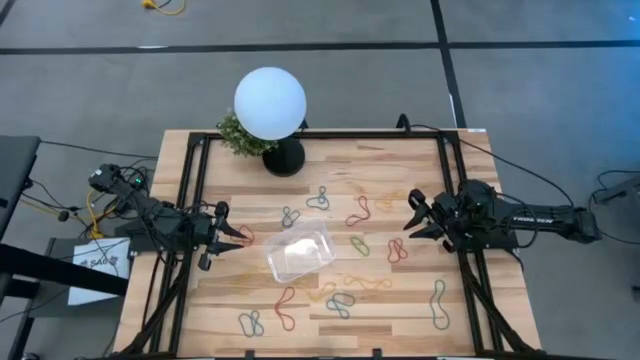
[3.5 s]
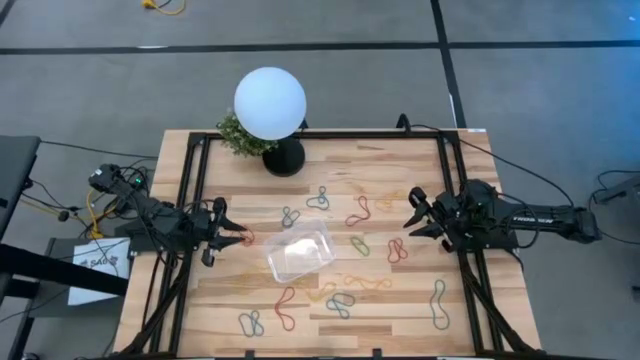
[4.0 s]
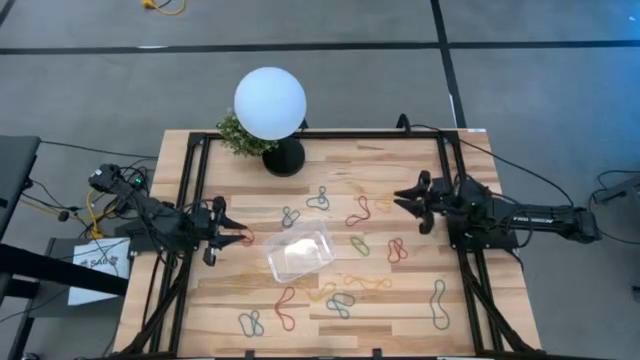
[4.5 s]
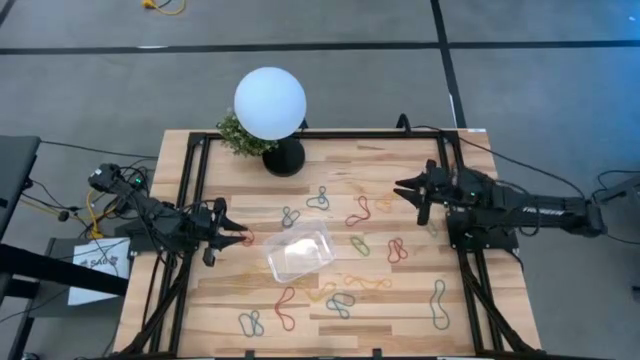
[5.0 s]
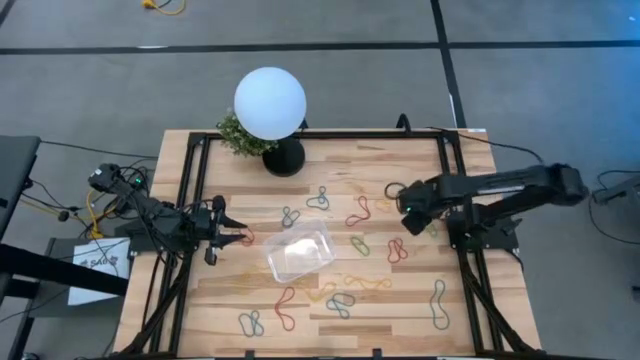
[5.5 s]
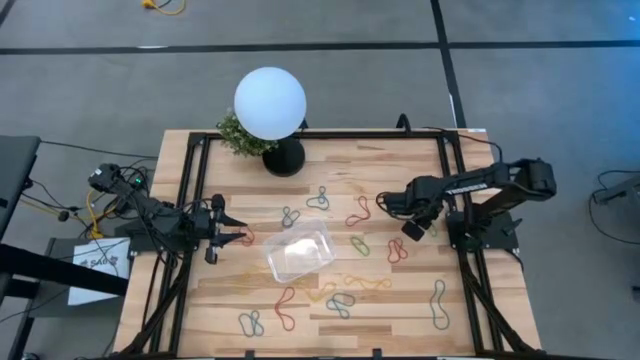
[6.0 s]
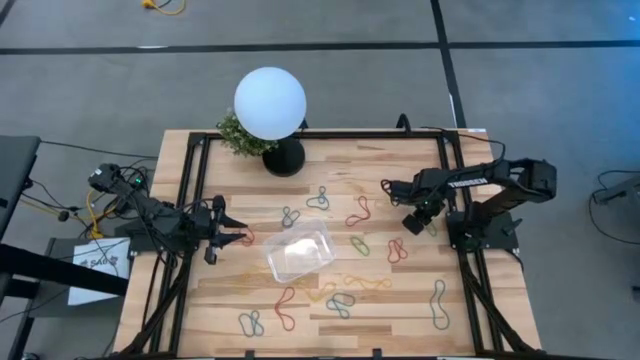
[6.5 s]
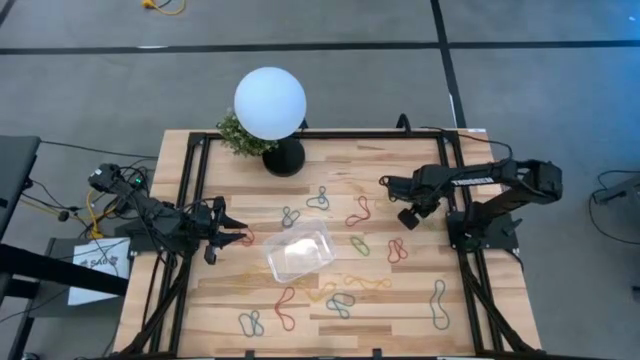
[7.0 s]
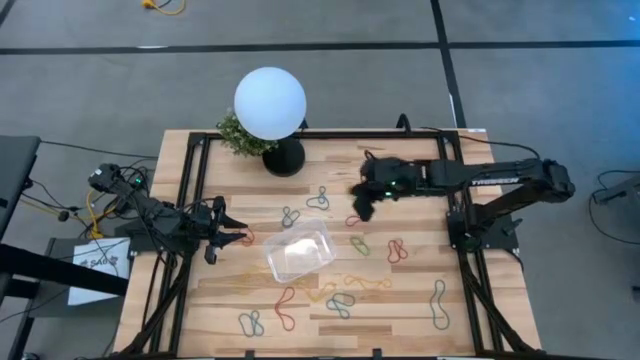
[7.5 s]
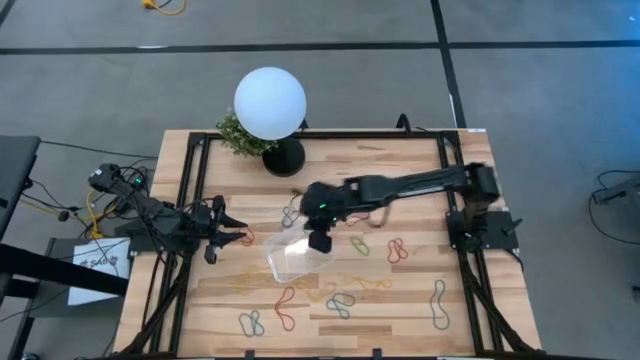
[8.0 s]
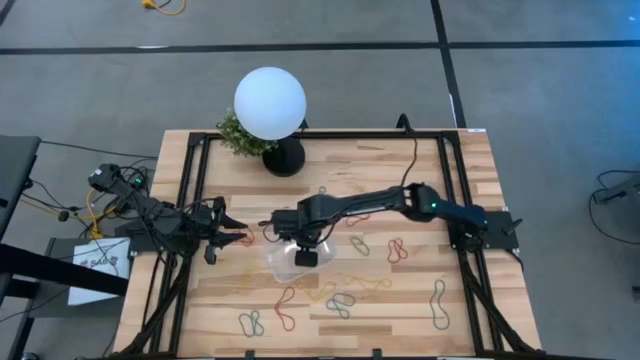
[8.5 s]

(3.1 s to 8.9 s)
Task: Pick and place items into bin
Put the green rubber band into the transparent bin

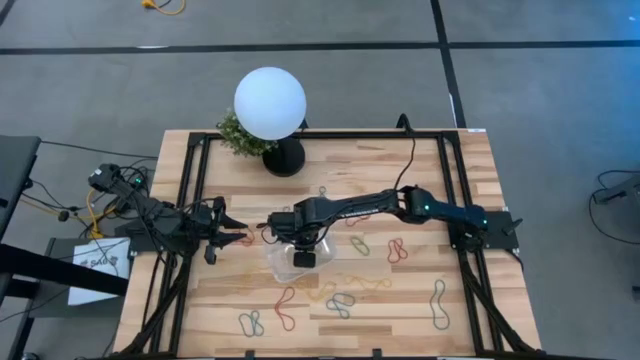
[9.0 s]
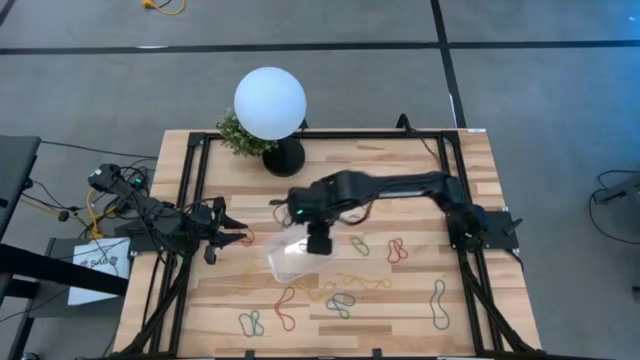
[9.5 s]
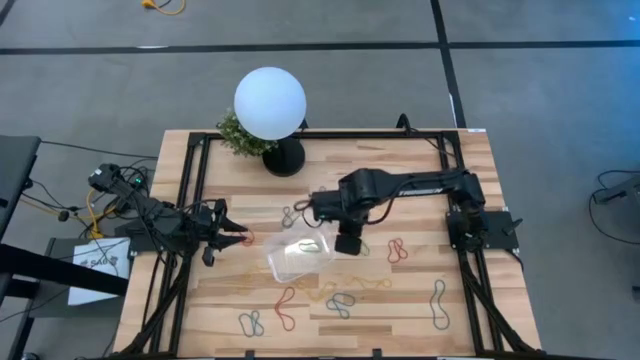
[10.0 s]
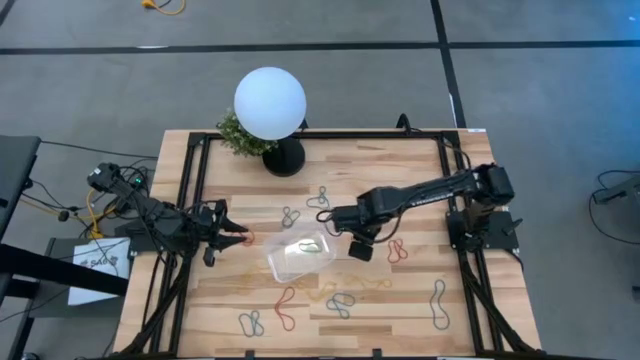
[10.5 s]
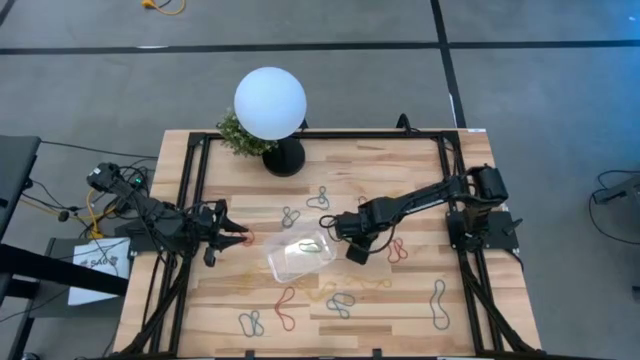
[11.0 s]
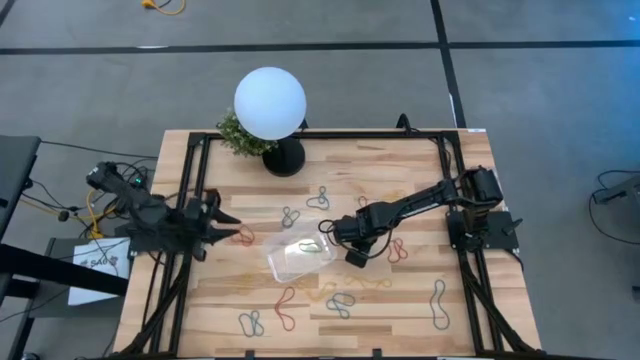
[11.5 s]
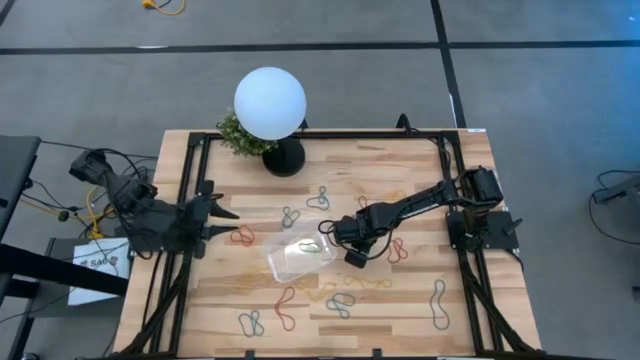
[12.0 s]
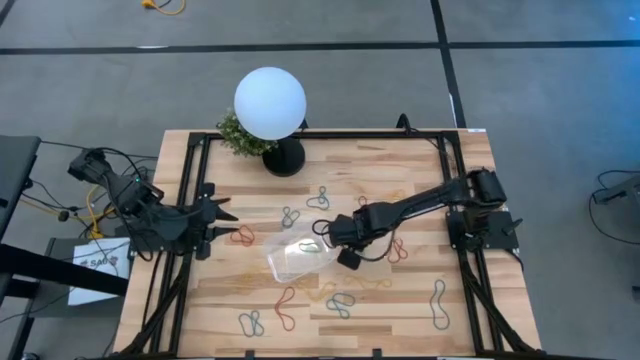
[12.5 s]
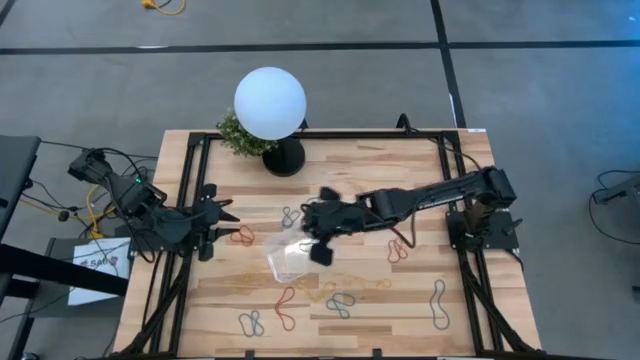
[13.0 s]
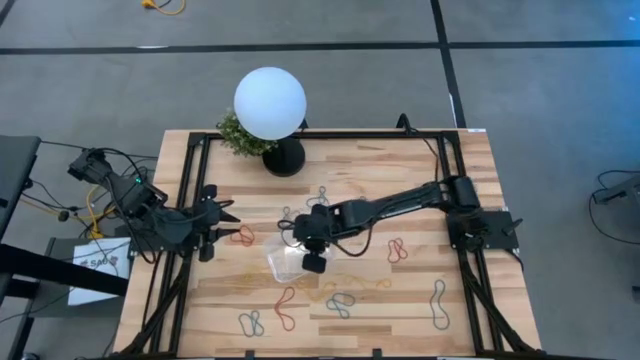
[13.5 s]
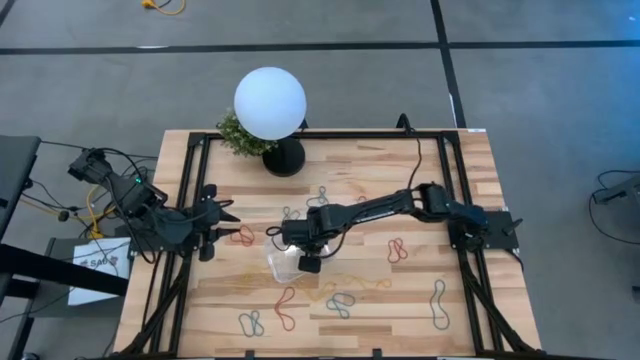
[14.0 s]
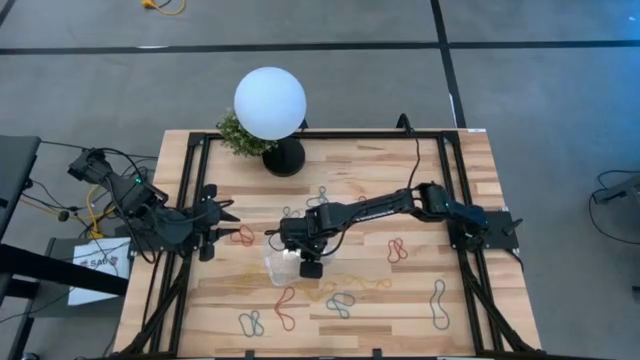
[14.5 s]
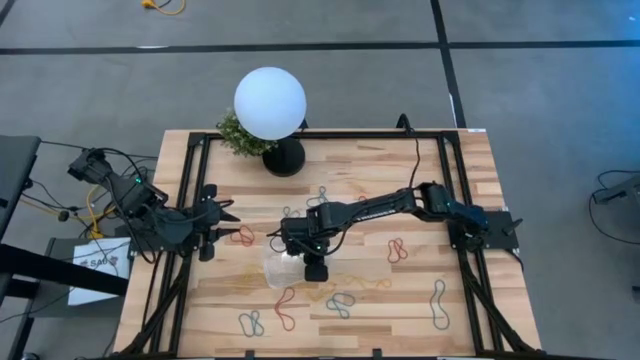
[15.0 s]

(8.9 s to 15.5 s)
Put the green rubber band into the transparent bin

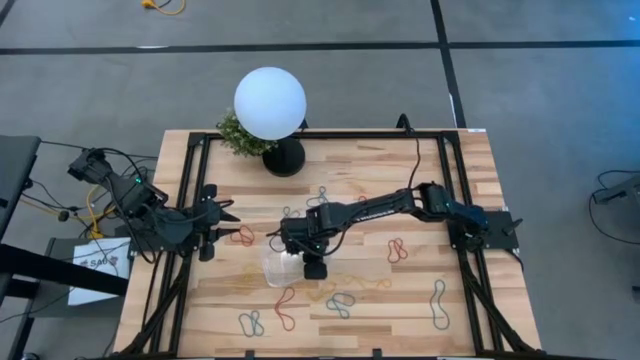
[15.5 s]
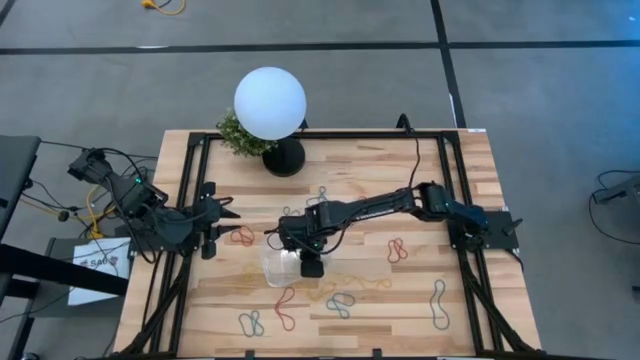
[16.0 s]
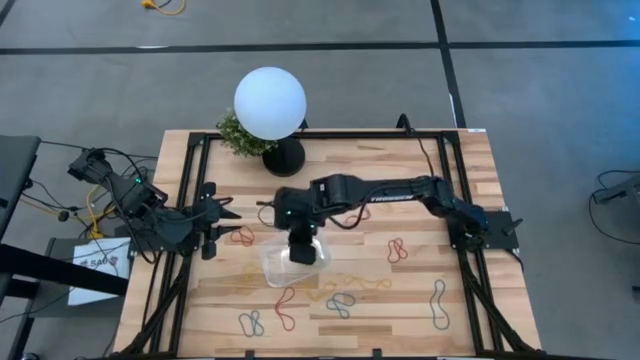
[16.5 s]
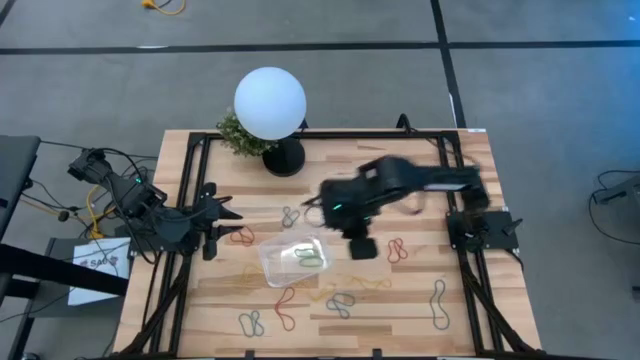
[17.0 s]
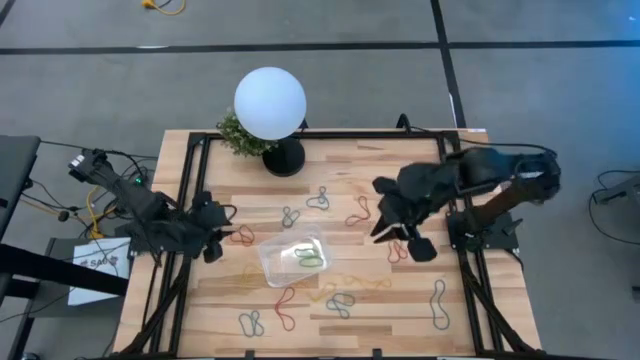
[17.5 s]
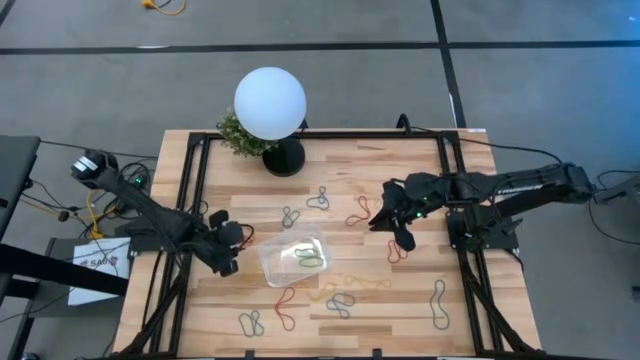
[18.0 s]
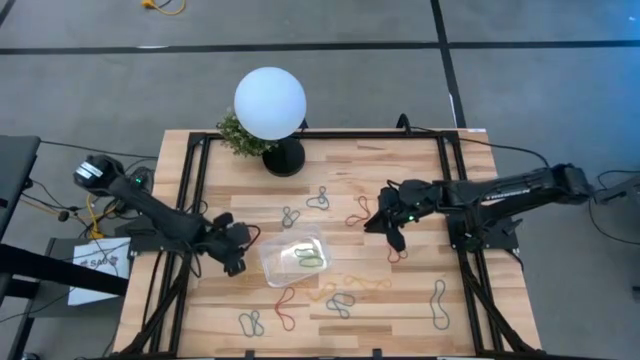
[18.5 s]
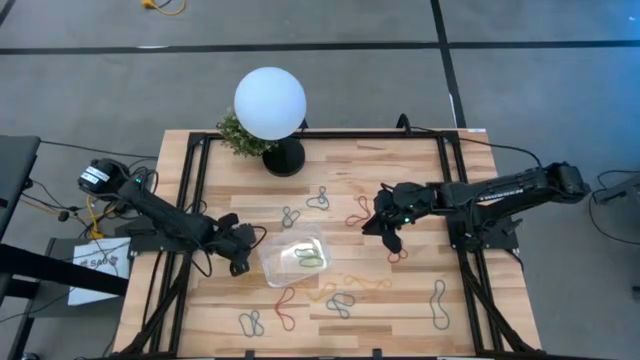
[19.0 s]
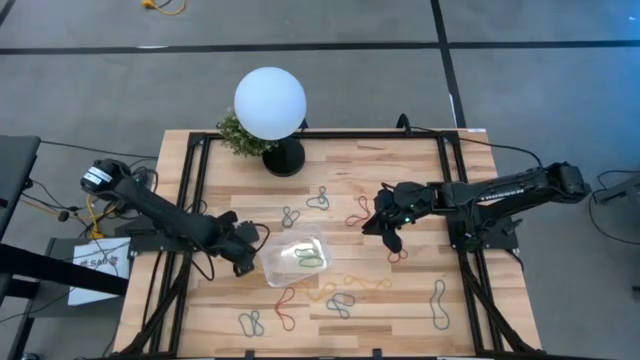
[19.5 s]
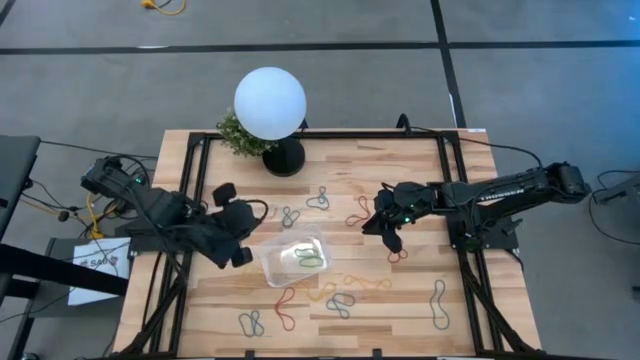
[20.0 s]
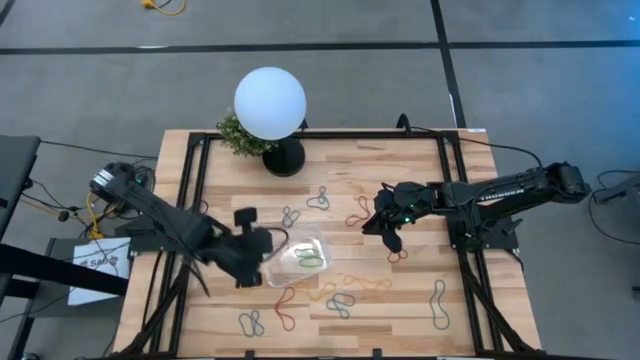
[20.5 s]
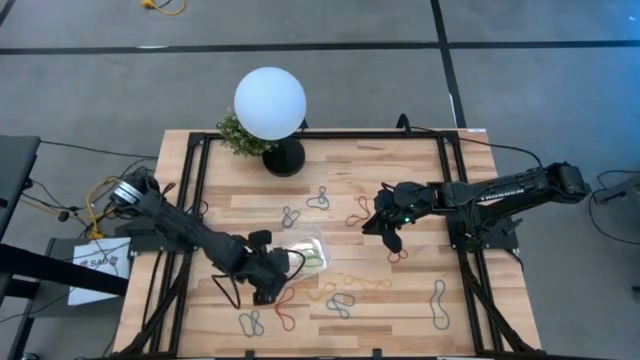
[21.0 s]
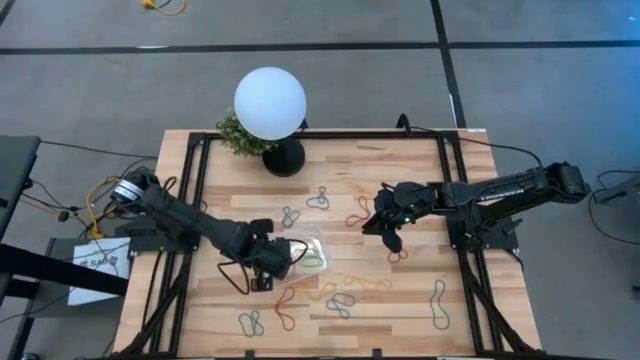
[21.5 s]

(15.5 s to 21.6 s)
Put the red rubber band into the transparent bin

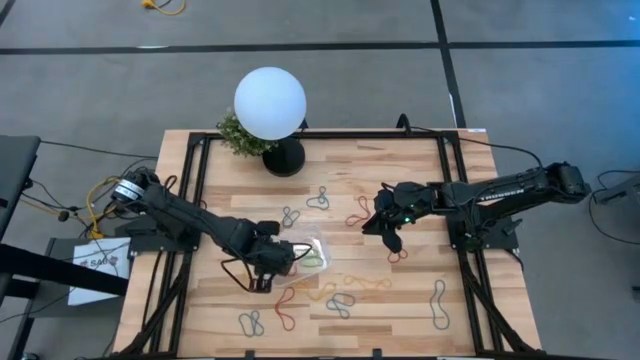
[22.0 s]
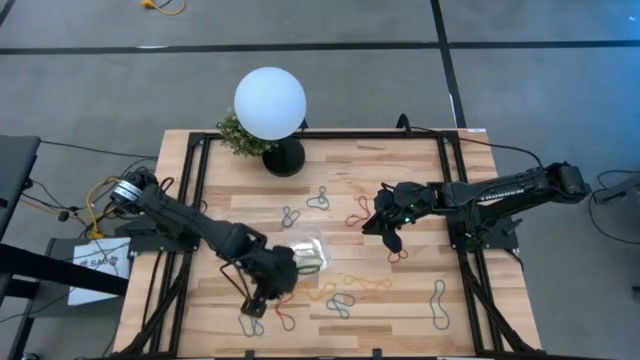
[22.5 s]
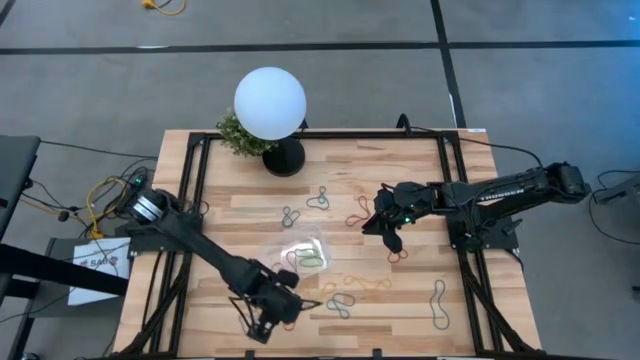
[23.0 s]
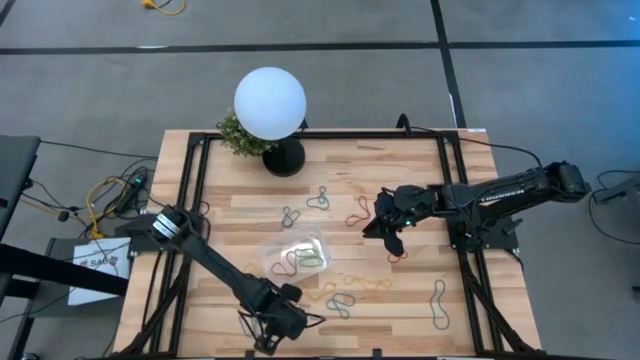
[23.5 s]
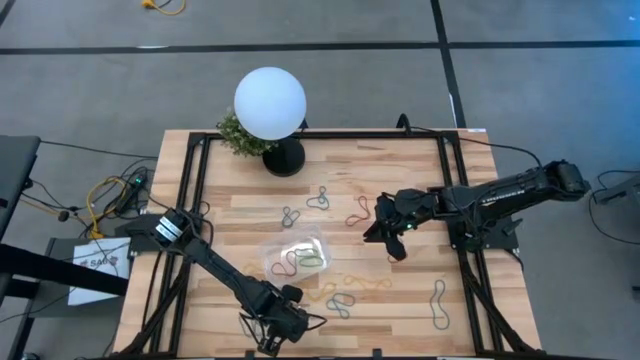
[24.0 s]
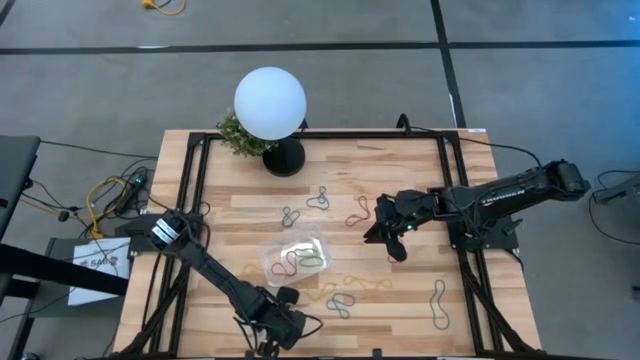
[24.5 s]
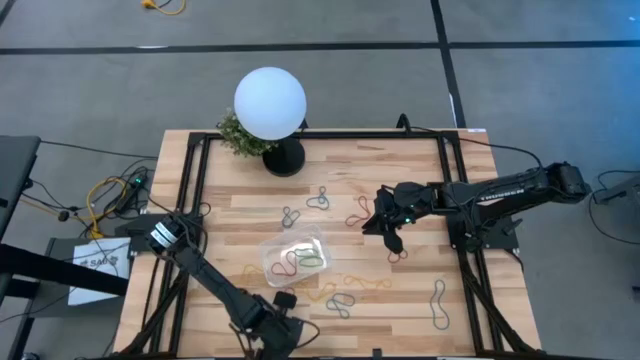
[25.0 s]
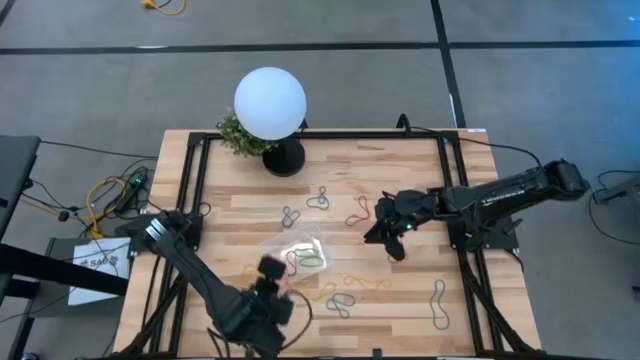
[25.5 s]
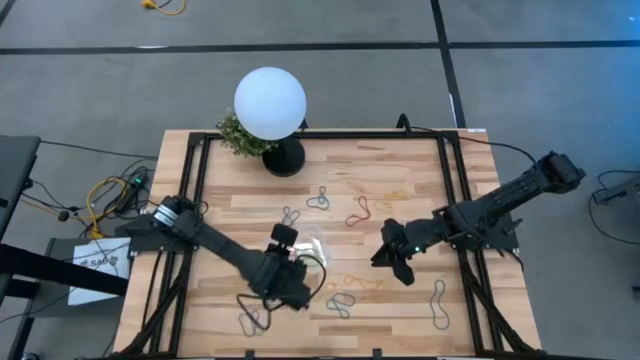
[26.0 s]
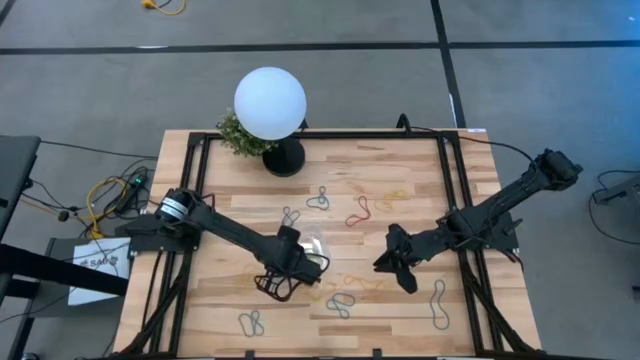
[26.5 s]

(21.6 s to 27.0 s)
Put the red rubber band into the transparent bin
